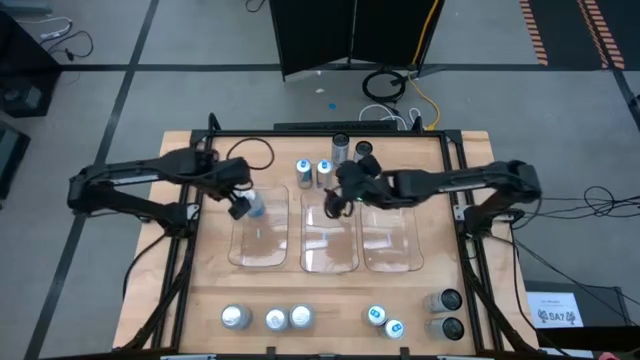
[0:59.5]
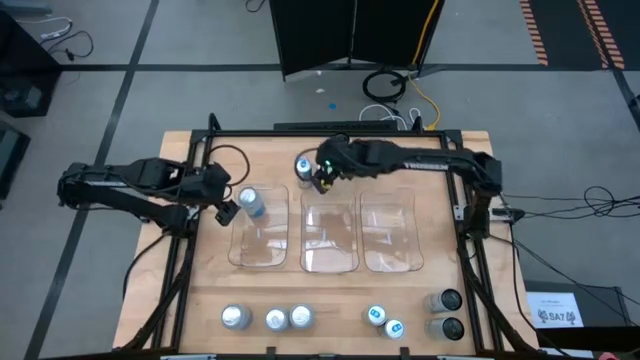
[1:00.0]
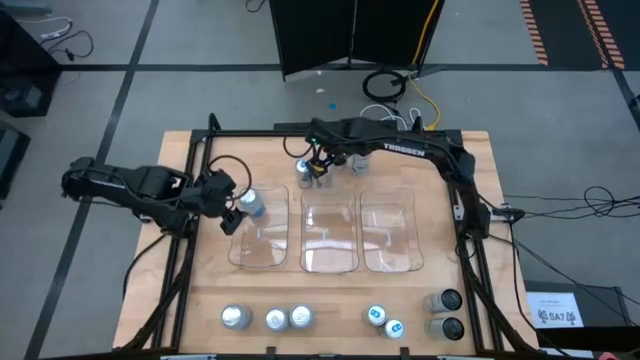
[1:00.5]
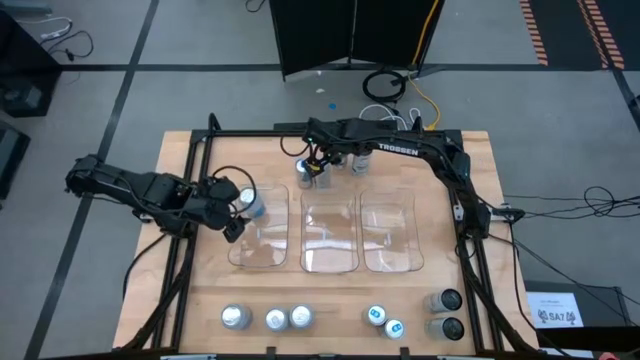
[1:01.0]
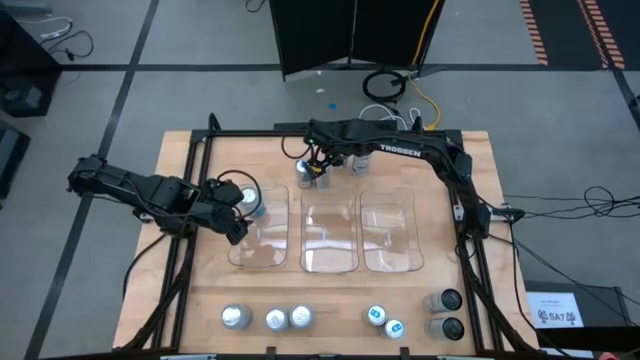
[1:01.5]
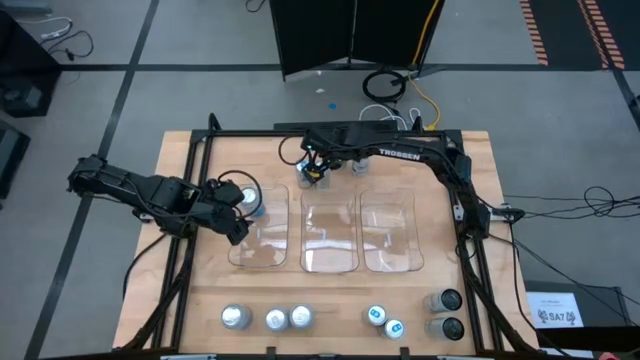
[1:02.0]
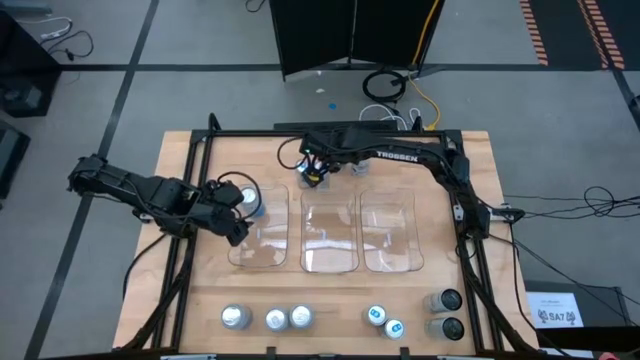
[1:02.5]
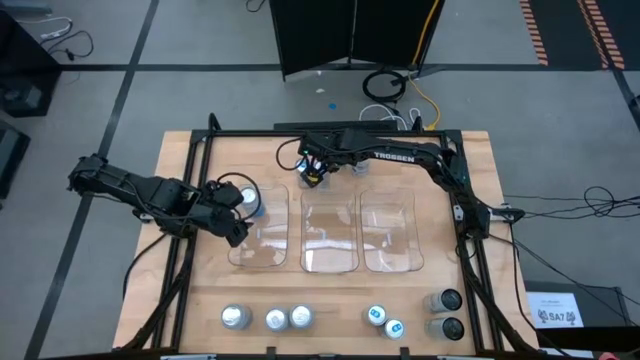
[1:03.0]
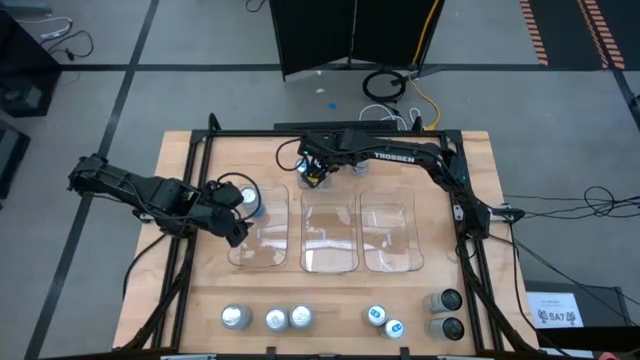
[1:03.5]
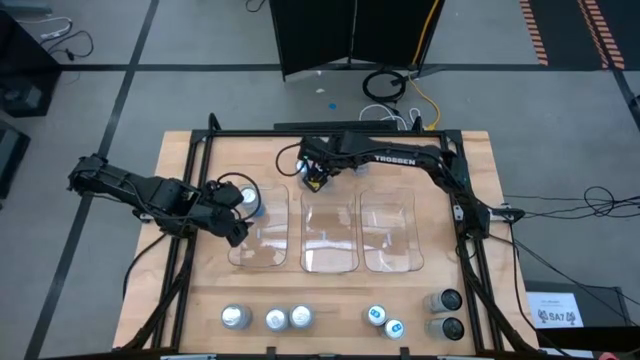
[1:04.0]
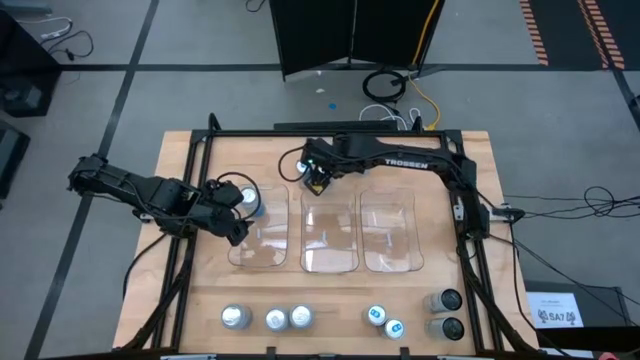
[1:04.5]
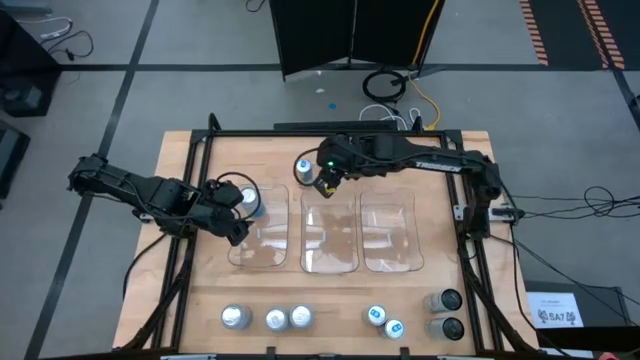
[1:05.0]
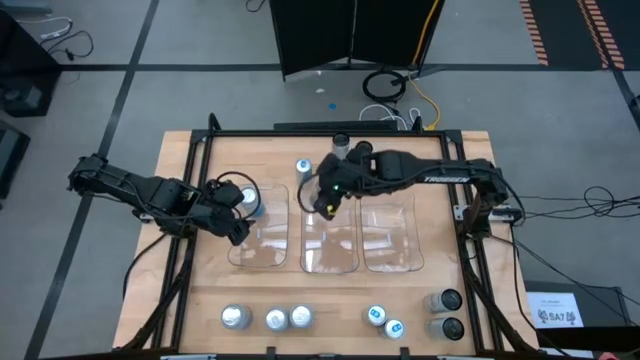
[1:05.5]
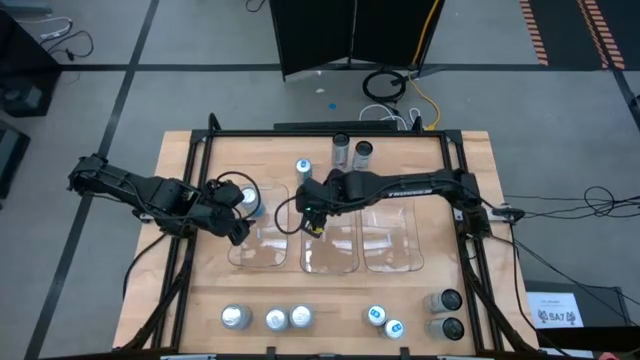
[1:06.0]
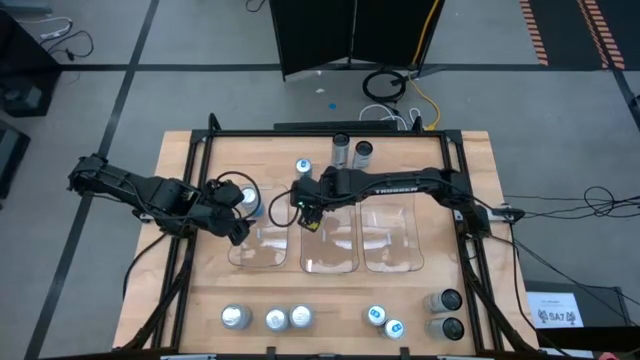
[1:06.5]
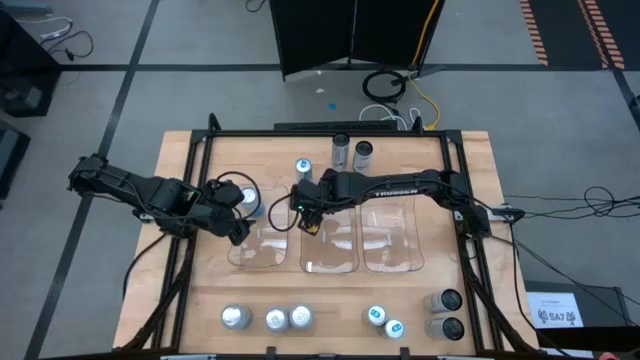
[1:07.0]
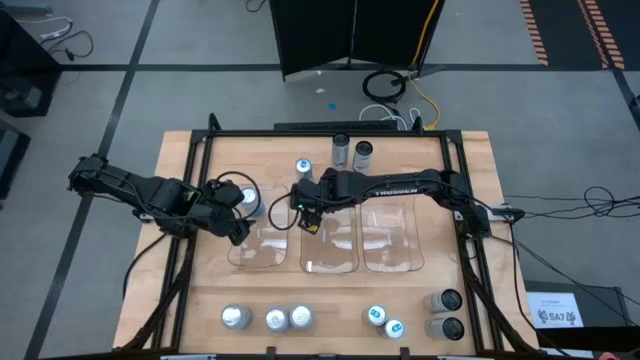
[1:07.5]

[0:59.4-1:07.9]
Task: Sort soda cans
Put the top right blue soda can into the middle transparent bin

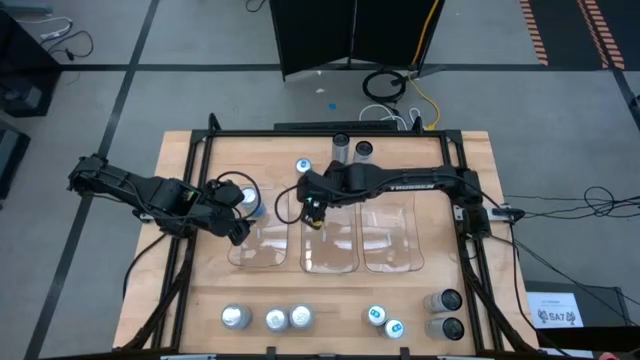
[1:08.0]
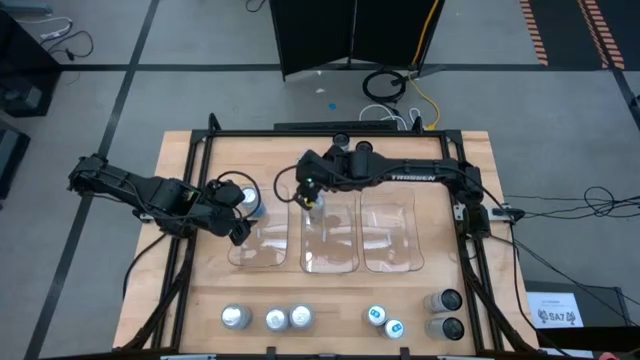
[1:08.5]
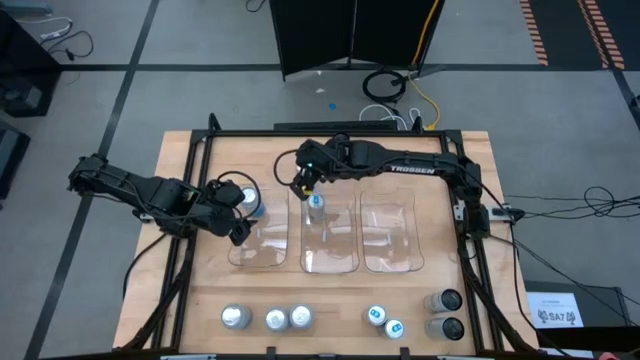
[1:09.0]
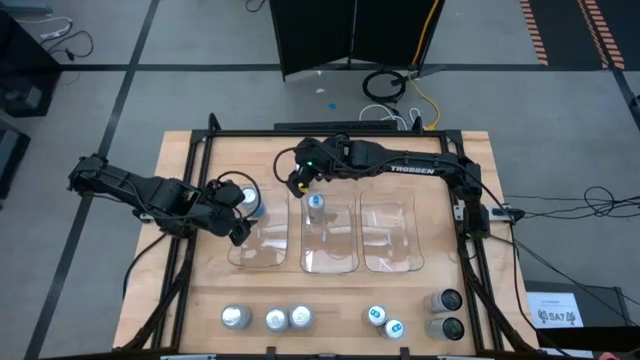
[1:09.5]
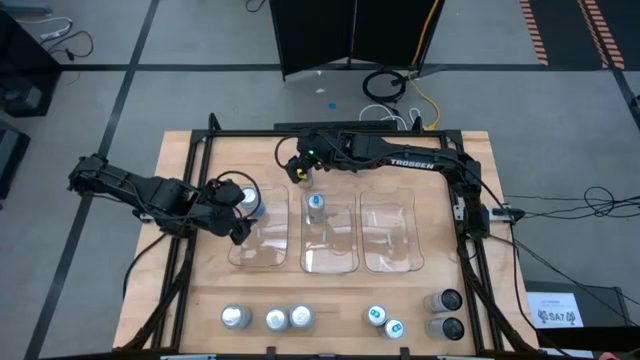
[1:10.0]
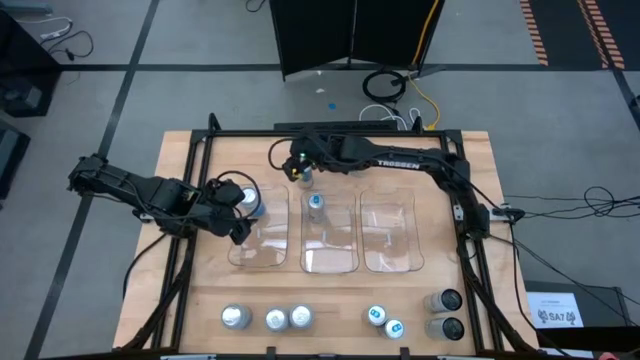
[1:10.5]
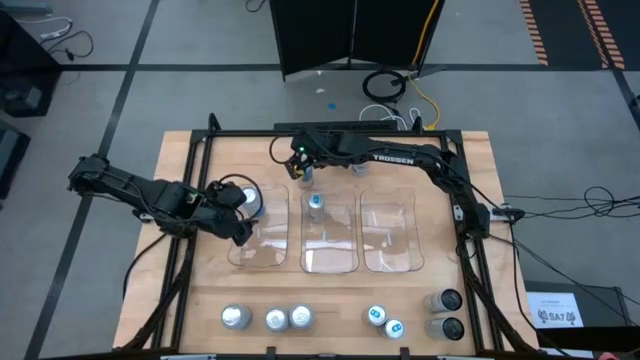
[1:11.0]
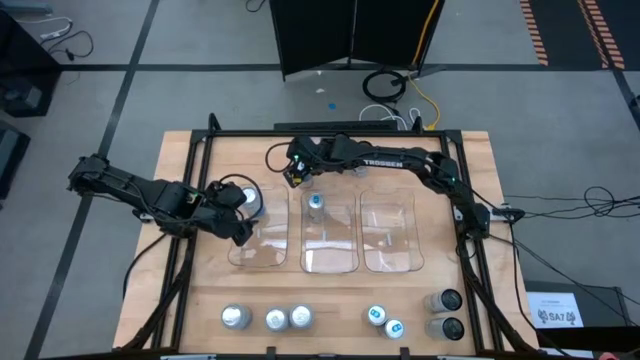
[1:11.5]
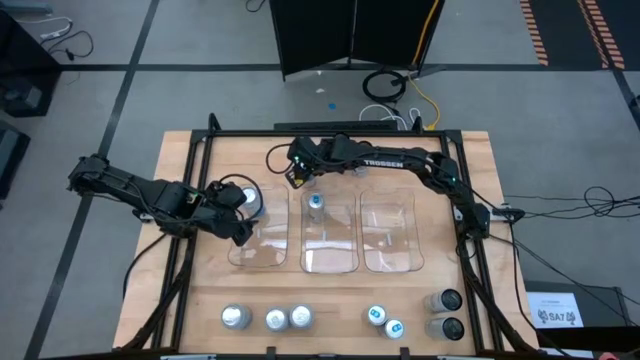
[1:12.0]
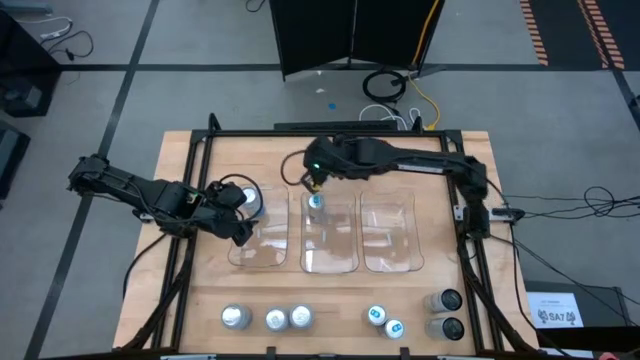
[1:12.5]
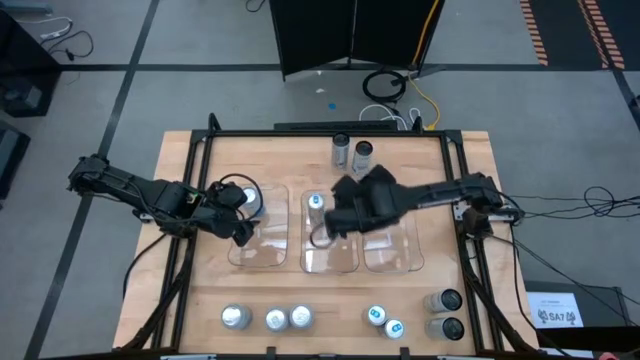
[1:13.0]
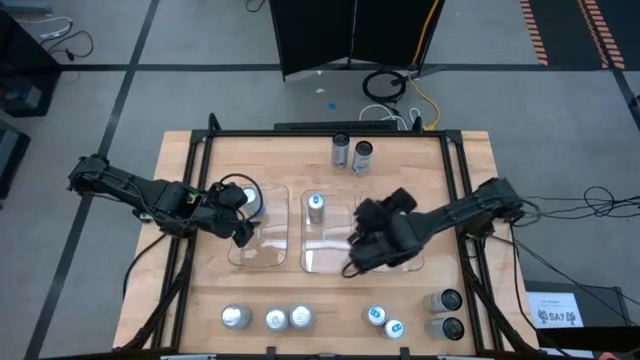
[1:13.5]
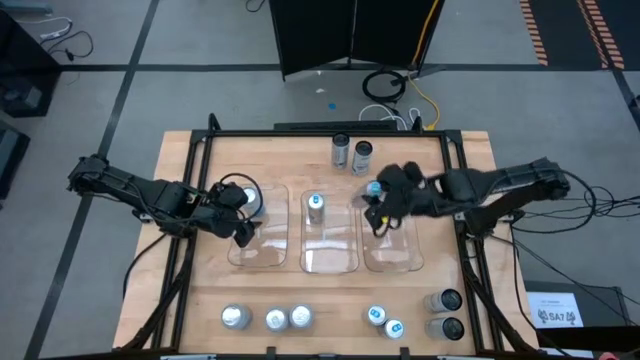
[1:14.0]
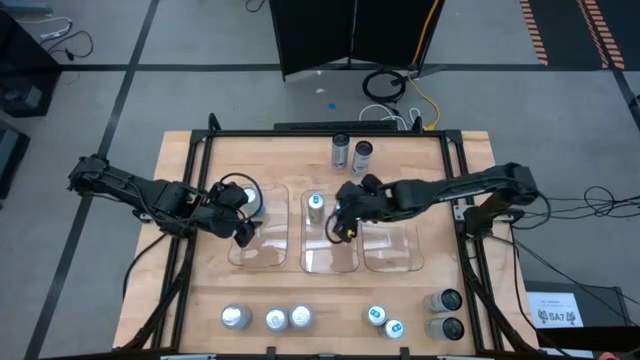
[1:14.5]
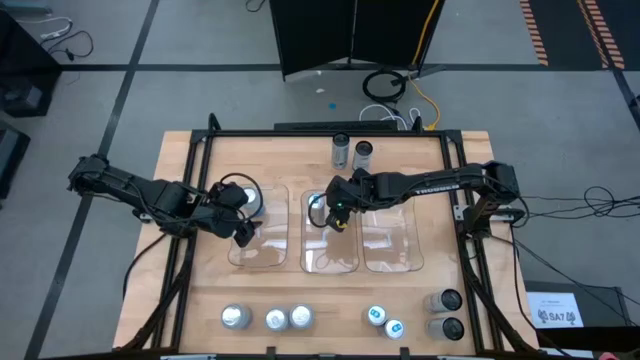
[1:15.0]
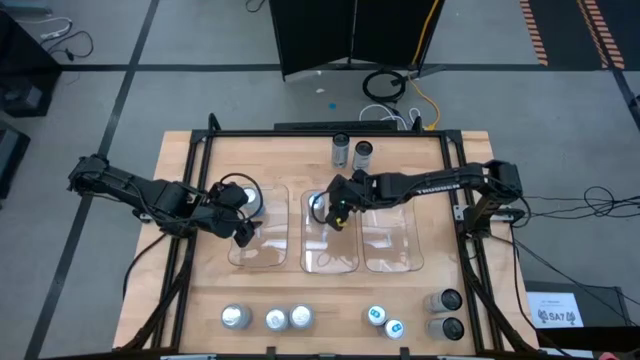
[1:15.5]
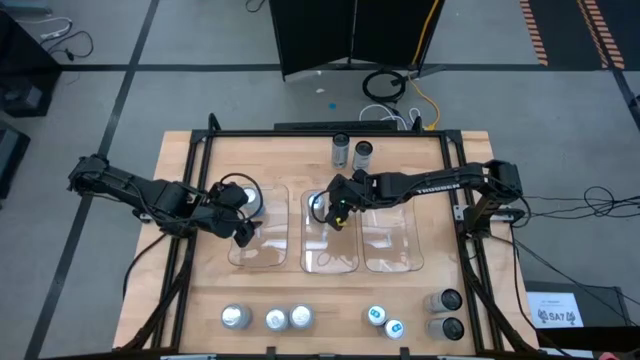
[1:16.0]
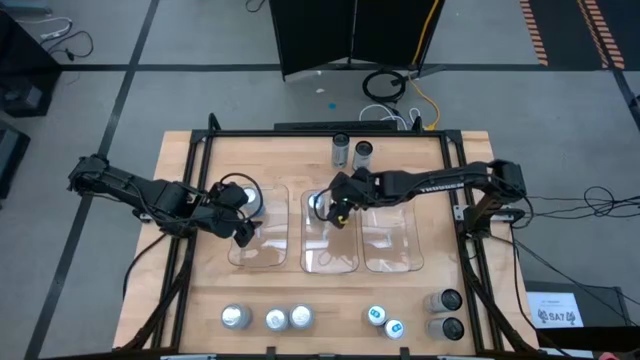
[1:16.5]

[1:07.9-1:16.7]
Put the top blue soda can into the middle transparent bin
